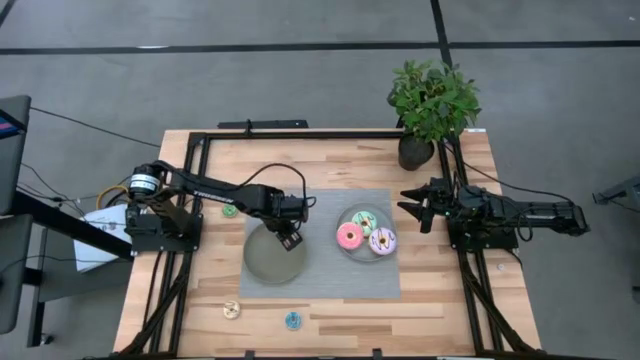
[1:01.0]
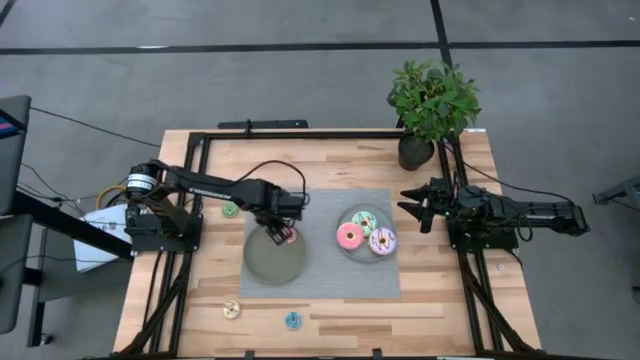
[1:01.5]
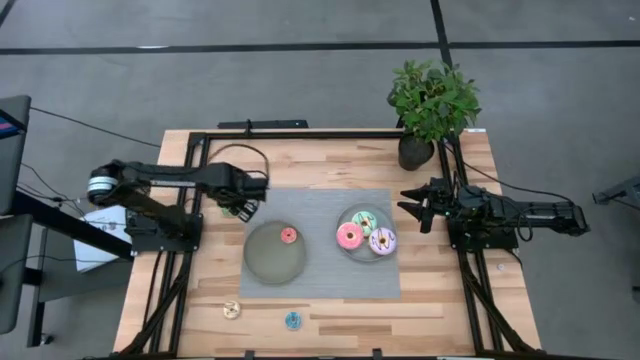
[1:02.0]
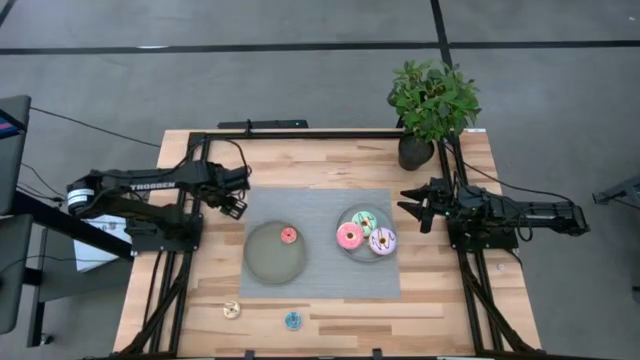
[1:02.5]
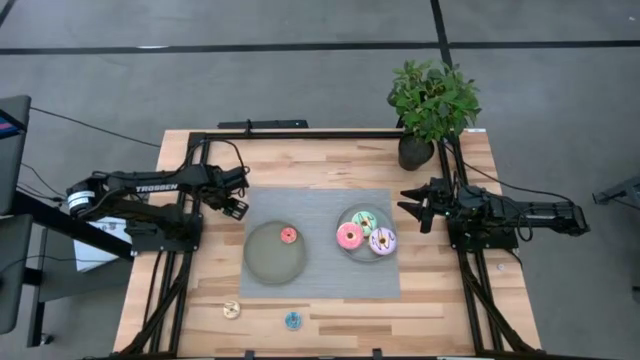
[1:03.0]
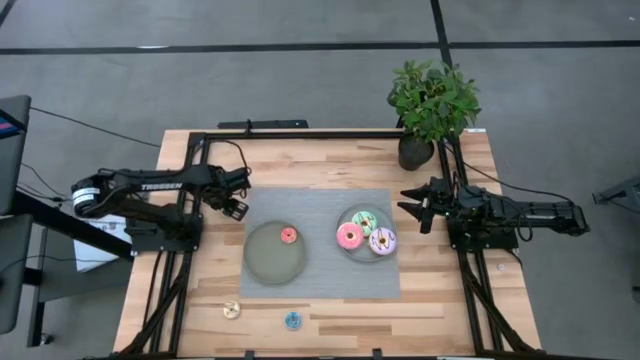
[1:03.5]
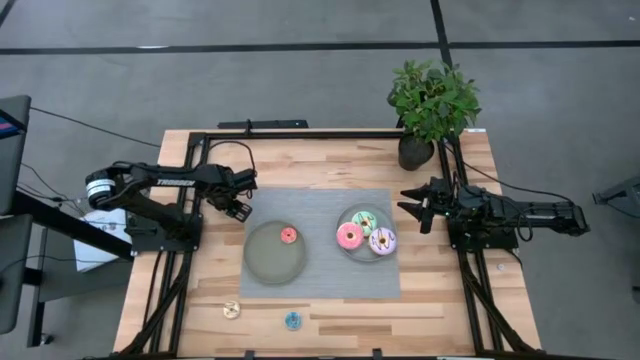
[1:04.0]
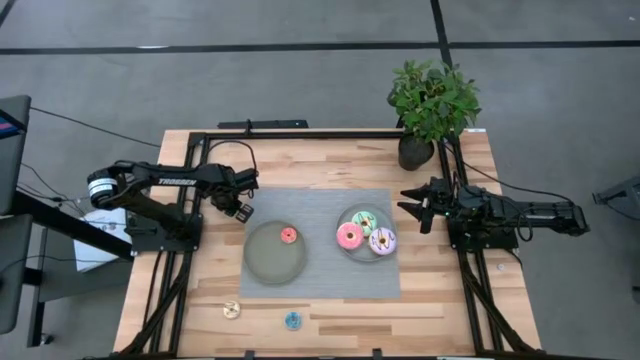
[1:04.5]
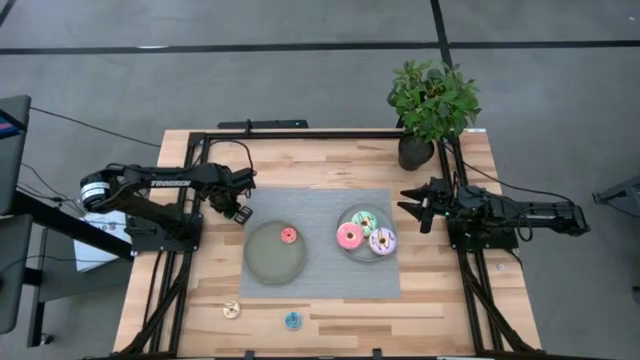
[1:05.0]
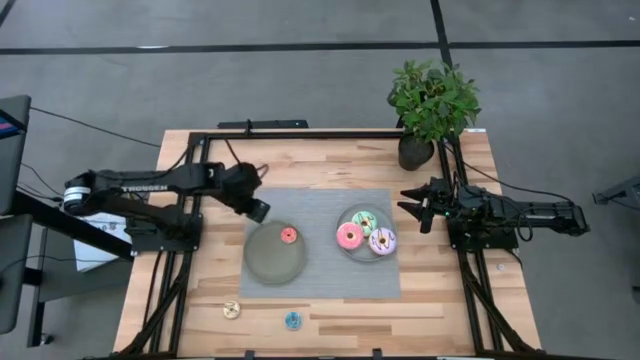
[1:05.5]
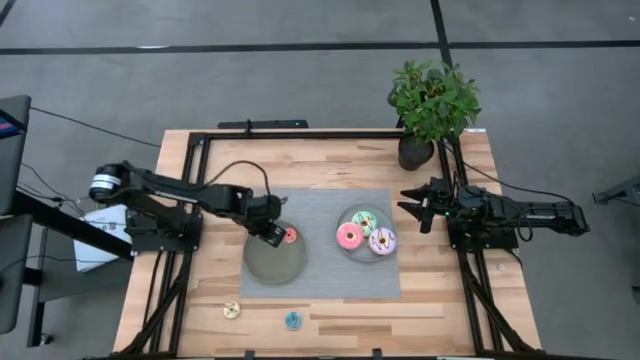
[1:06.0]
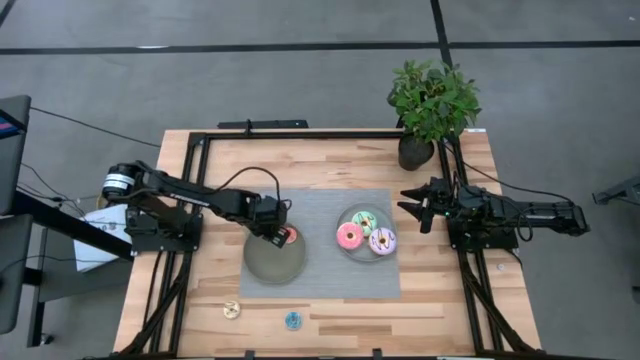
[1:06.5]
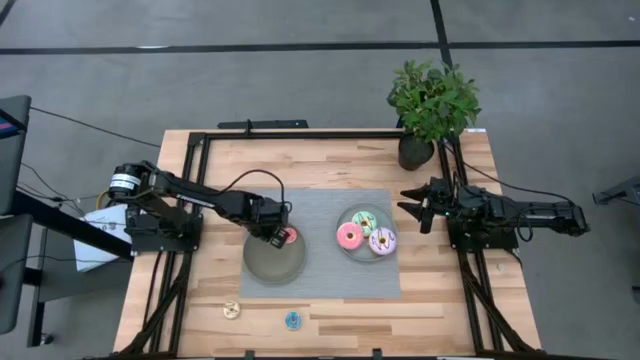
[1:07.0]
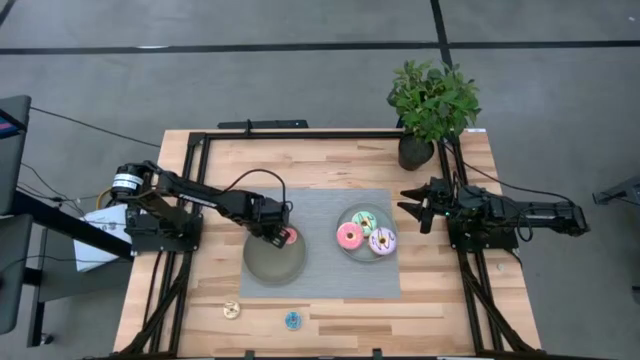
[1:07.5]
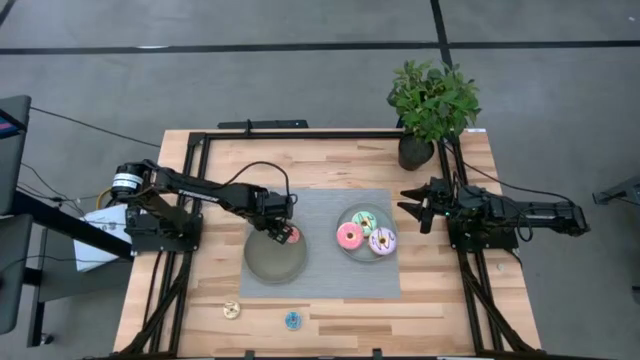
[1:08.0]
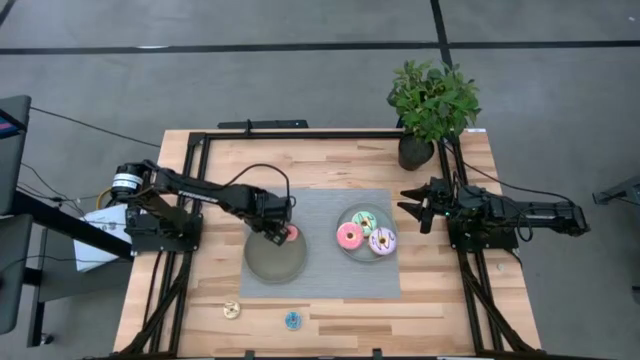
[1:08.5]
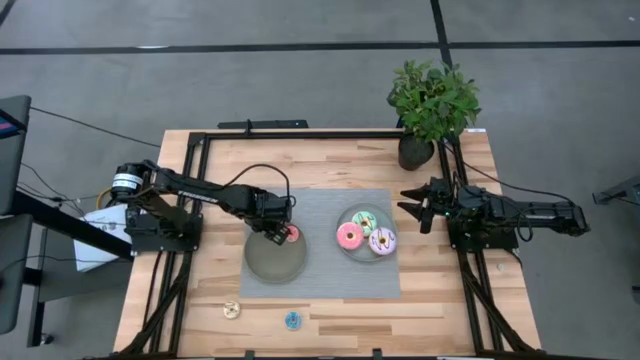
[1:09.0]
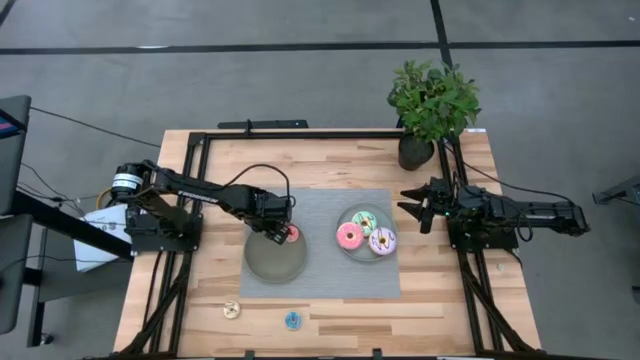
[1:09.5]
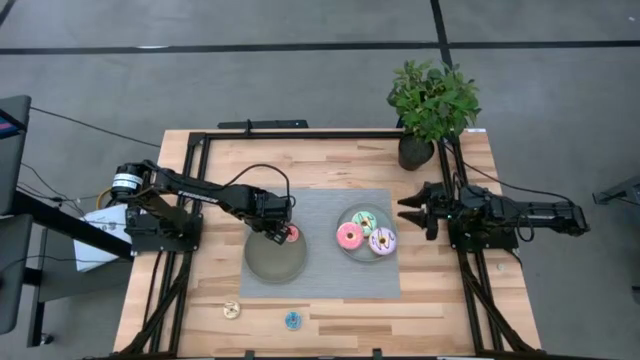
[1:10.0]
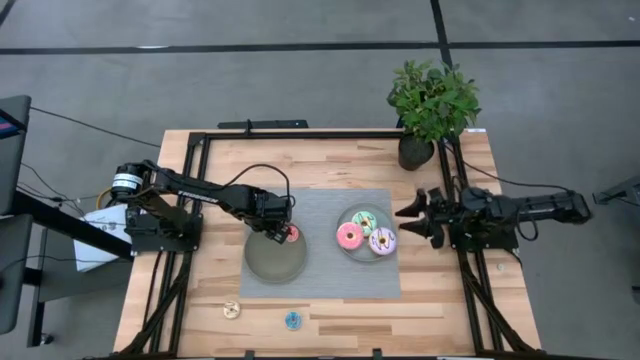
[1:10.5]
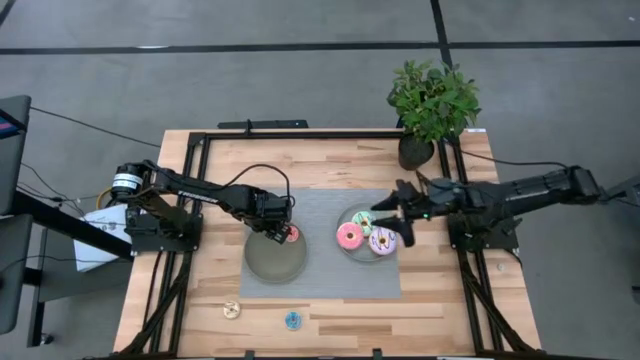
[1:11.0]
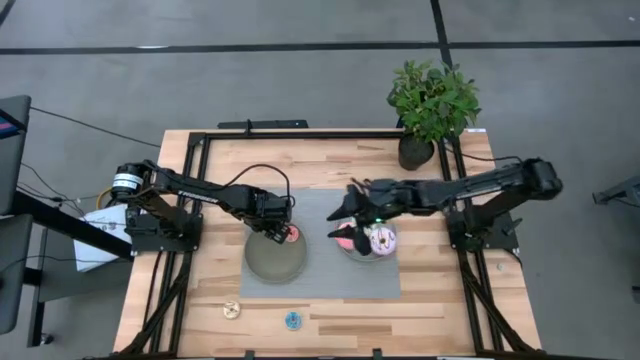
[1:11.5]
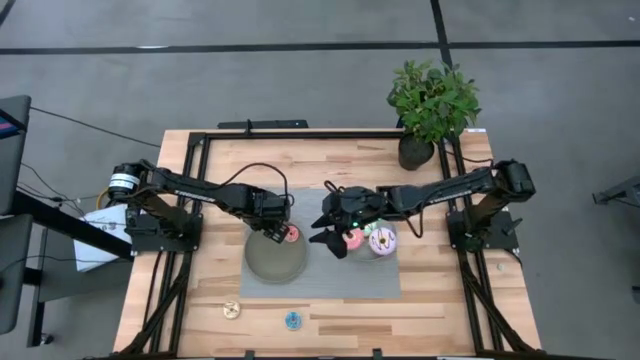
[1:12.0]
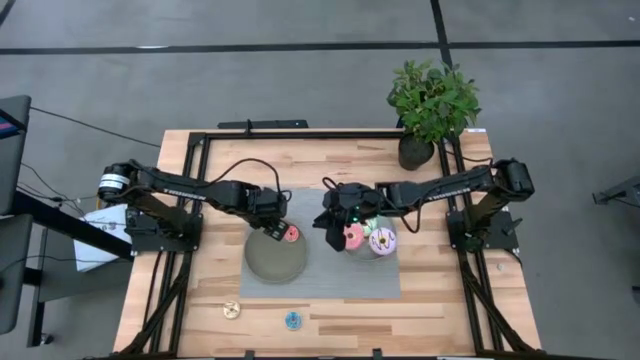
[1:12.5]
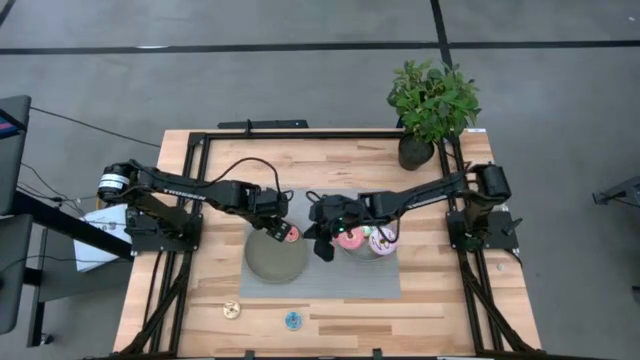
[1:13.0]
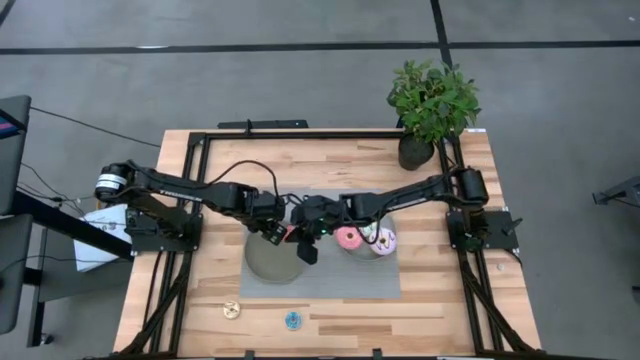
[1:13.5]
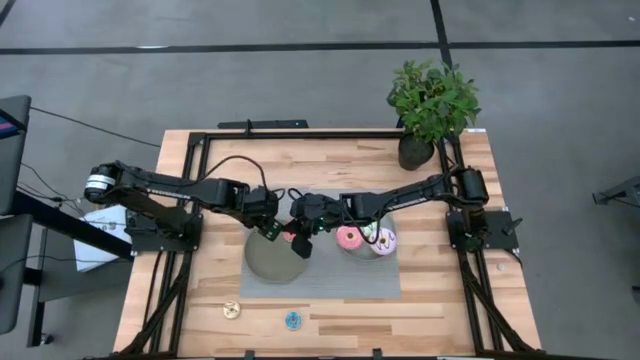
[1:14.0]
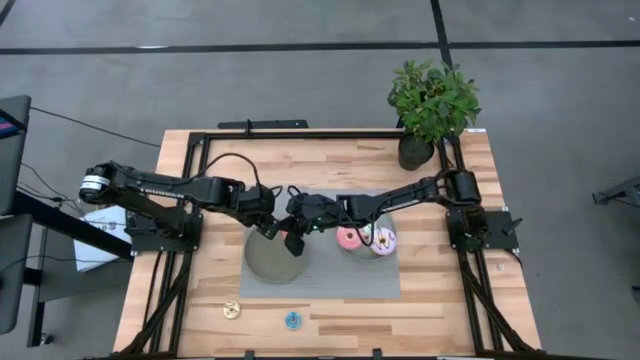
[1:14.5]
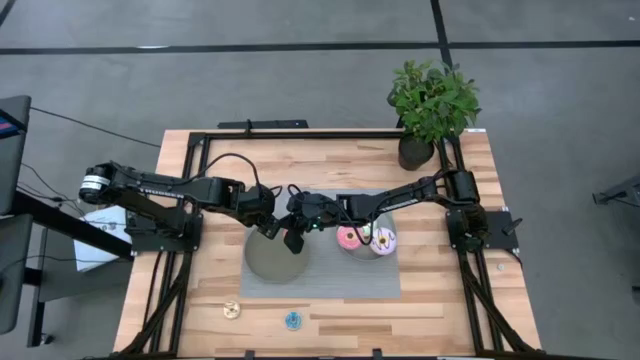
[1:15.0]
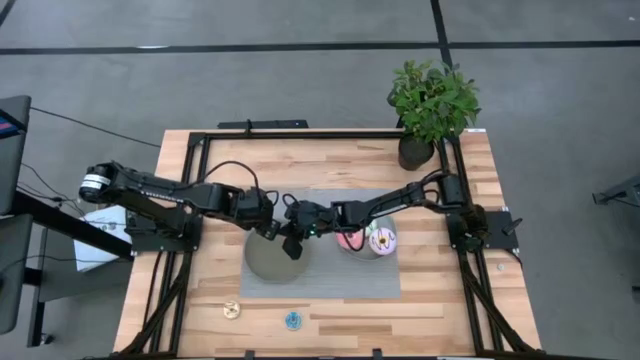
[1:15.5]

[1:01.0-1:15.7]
Task: Pick & Place donuts
Put the small green donut on the brown plate

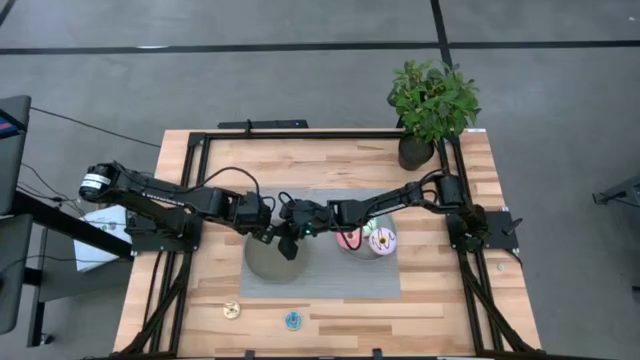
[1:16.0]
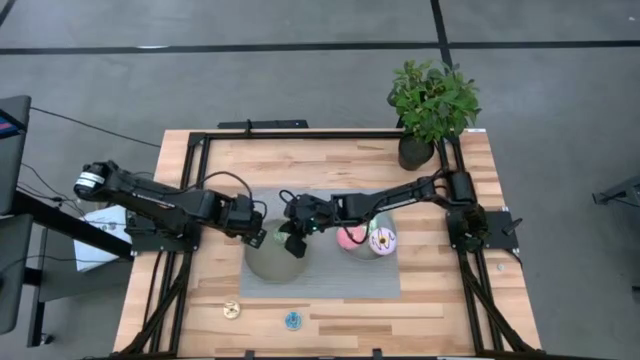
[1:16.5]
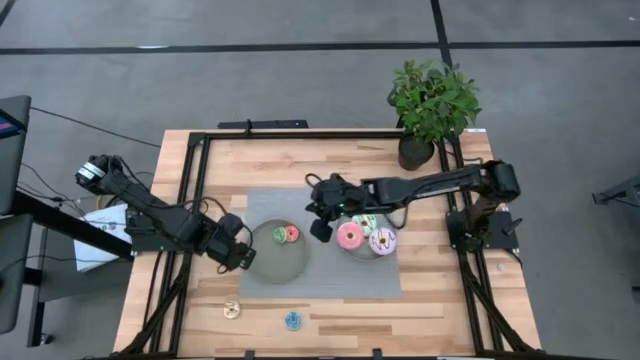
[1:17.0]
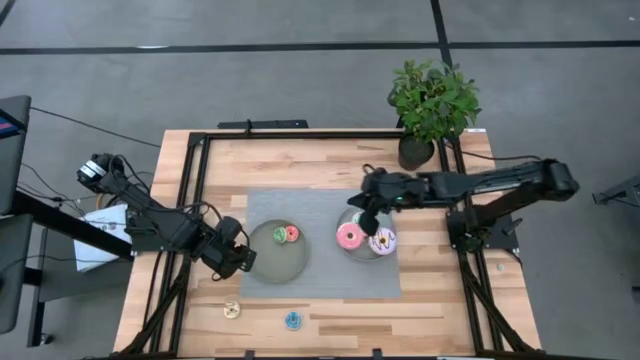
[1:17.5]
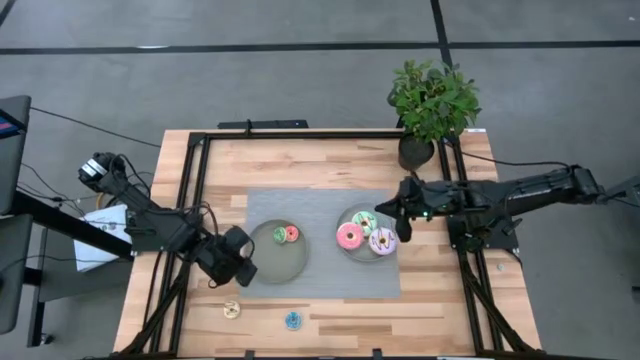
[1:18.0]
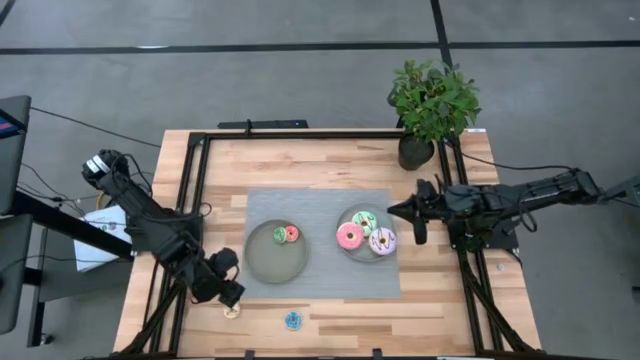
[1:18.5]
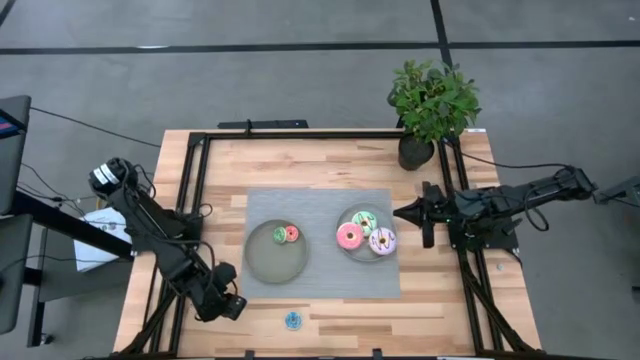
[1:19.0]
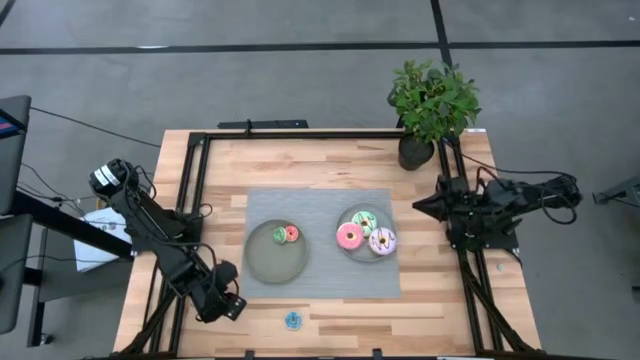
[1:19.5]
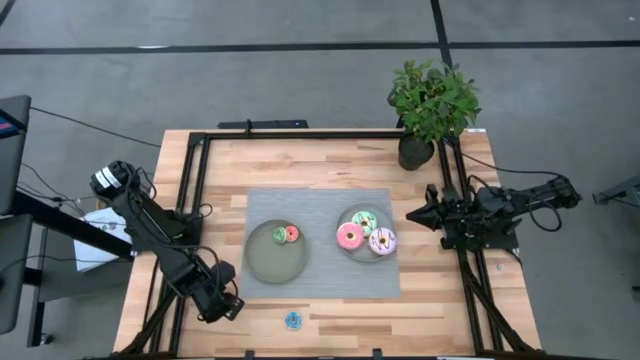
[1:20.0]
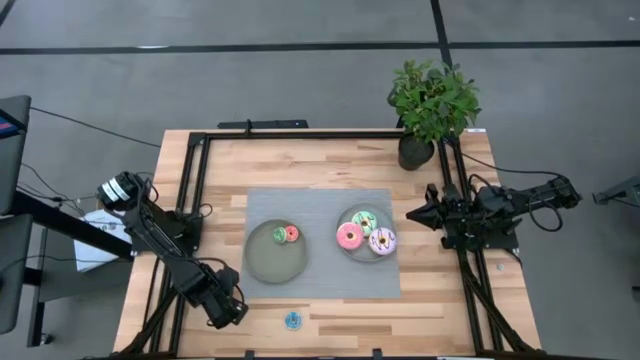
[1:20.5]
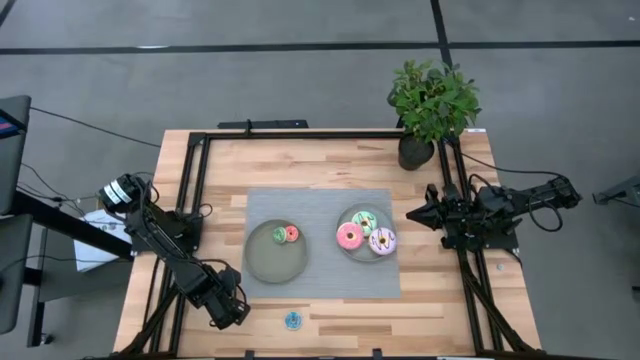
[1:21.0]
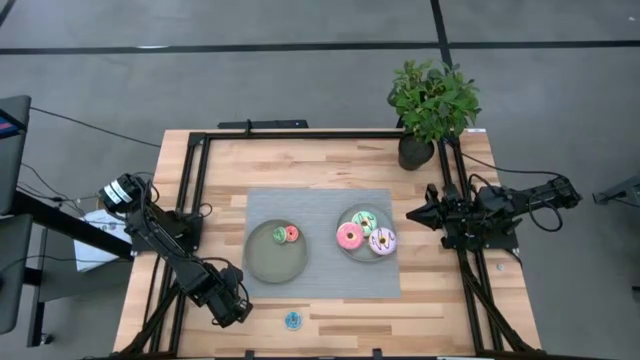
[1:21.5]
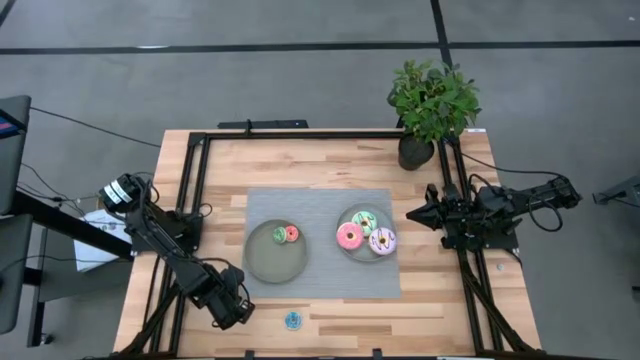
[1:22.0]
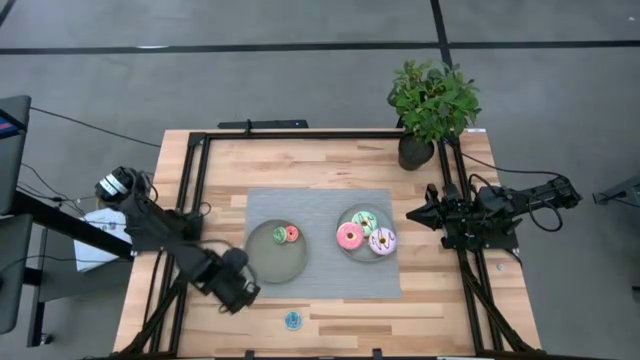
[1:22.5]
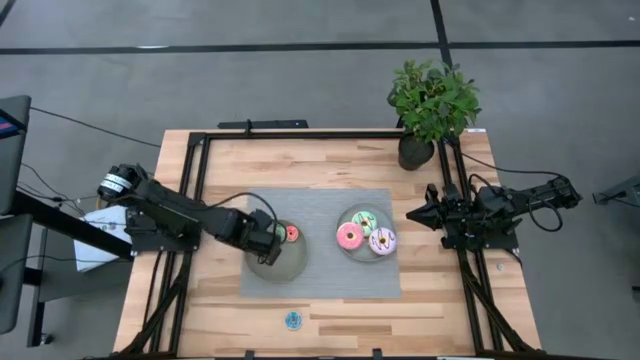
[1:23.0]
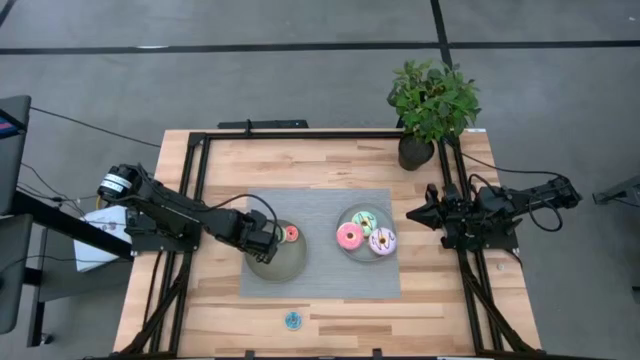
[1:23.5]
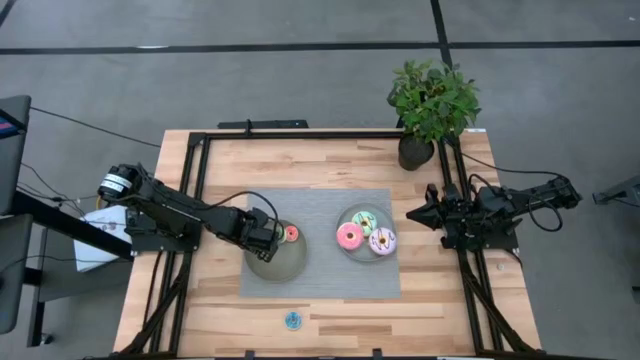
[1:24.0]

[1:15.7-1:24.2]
Put the small white donut on the brown plate
